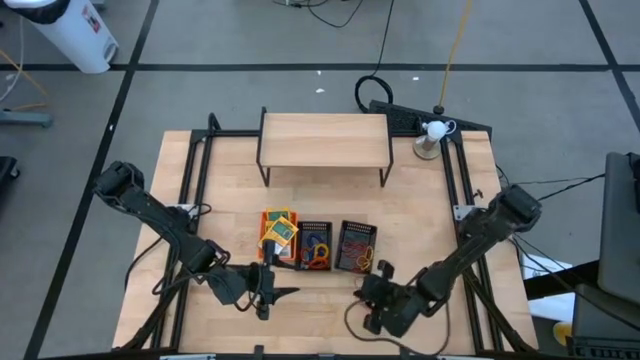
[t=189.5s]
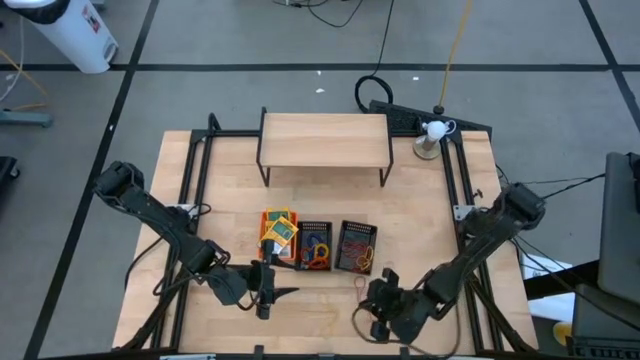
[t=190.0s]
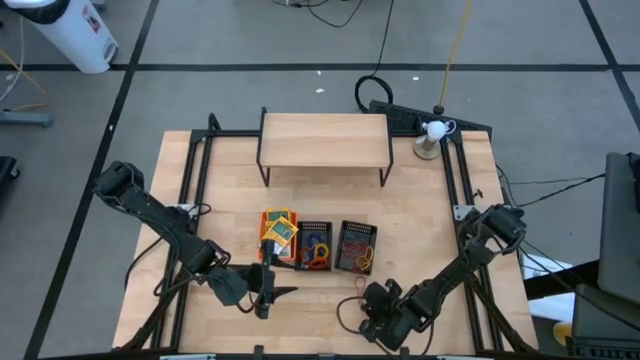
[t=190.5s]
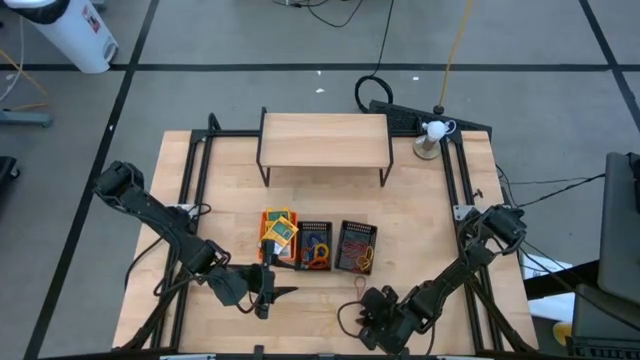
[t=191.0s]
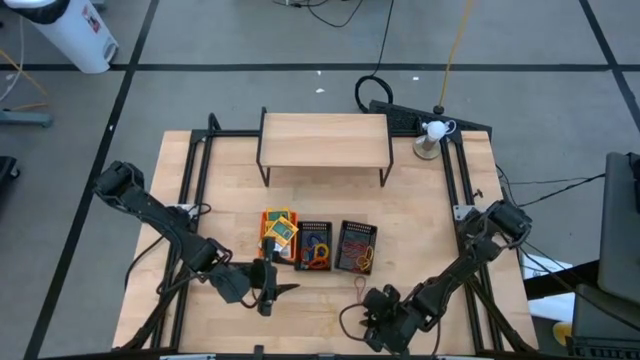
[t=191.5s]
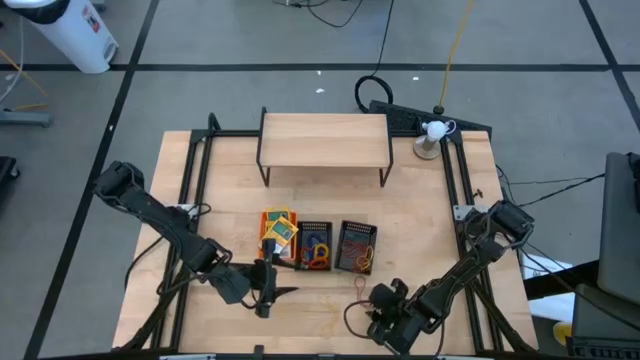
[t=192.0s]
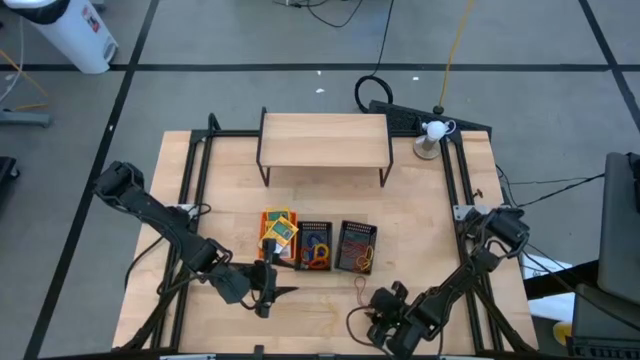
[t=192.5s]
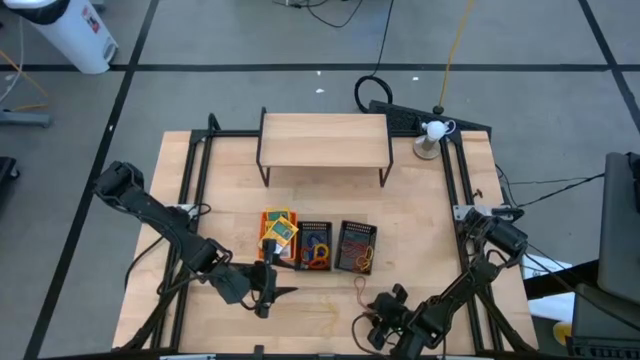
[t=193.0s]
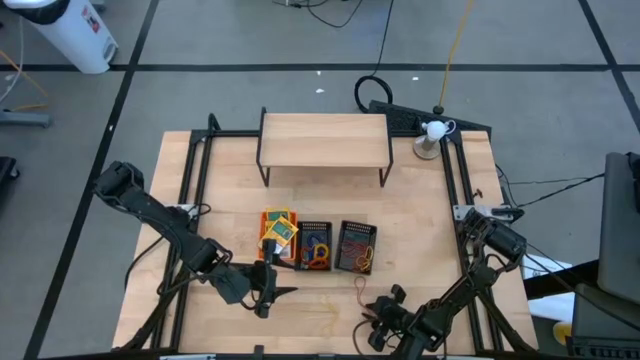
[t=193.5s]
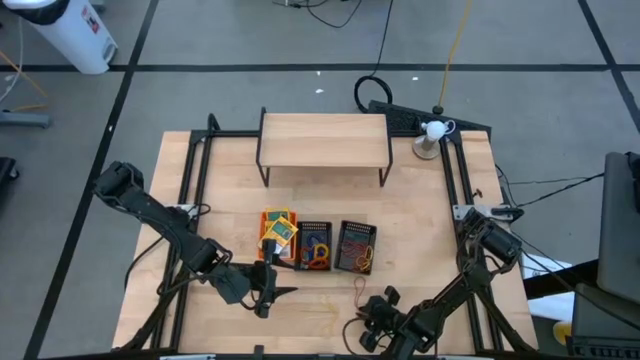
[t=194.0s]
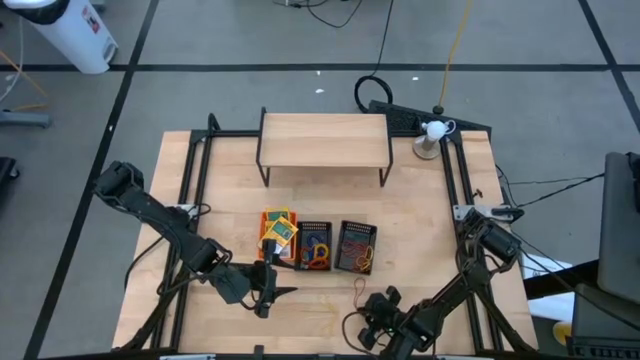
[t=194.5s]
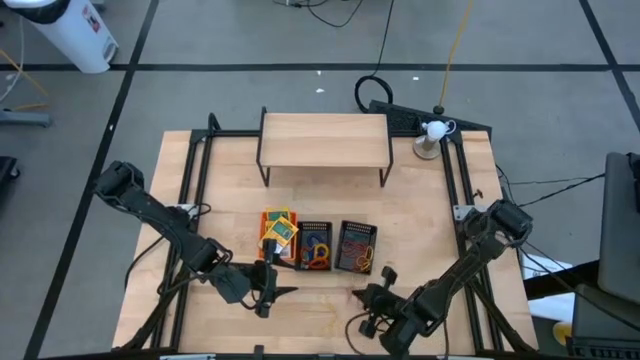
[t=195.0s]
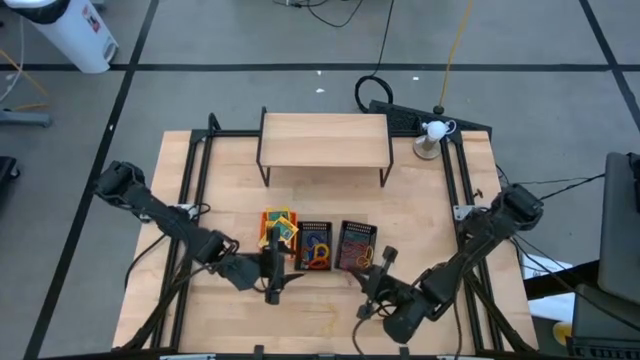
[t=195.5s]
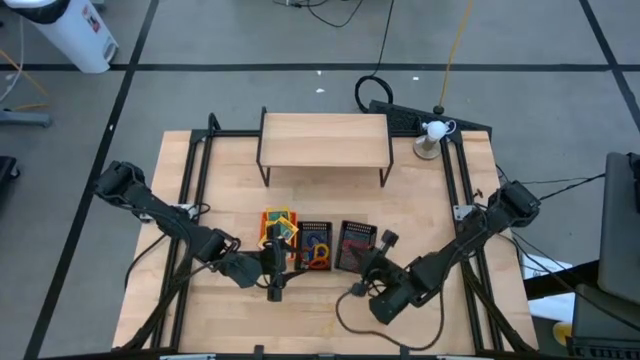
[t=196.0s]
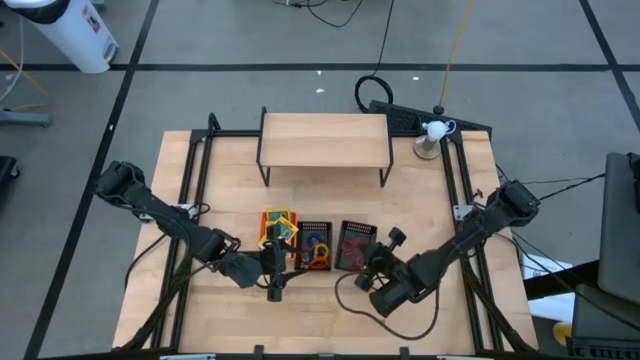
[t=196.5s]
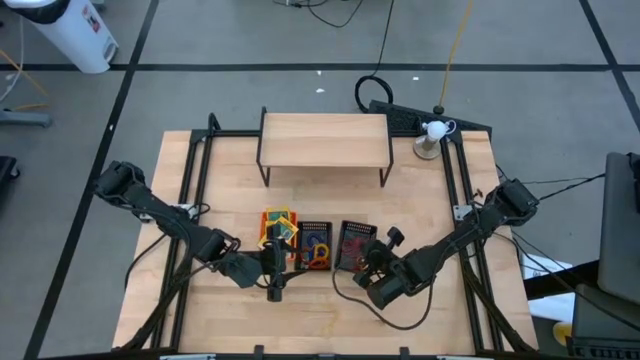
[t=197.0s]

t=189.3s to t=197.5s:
Task: Pick & Place Office Desk Supplies
Put the red rubber band into the right black bin

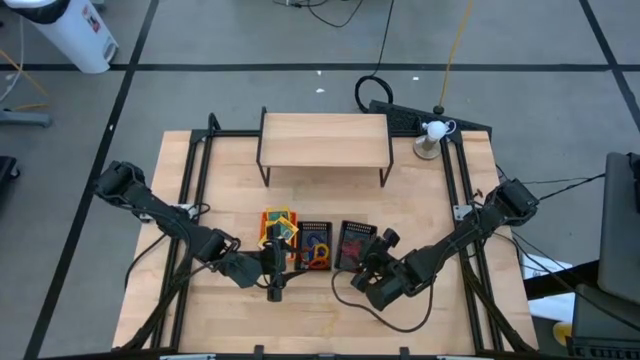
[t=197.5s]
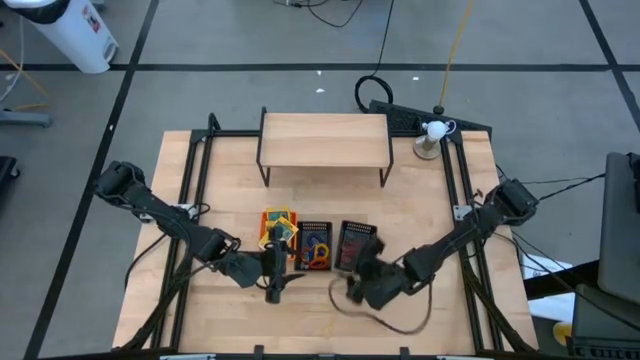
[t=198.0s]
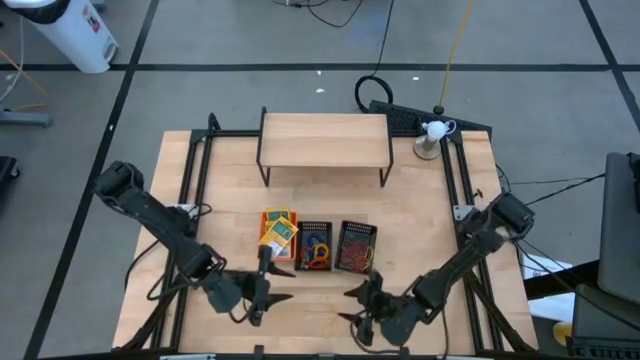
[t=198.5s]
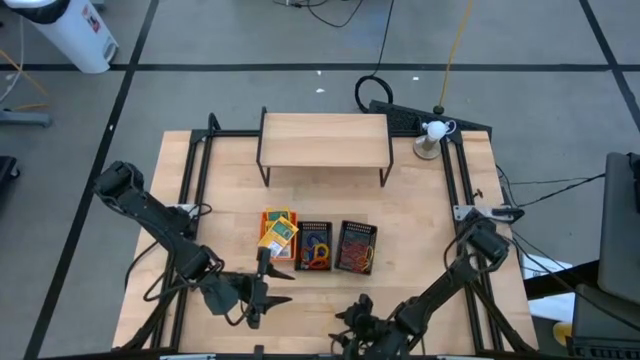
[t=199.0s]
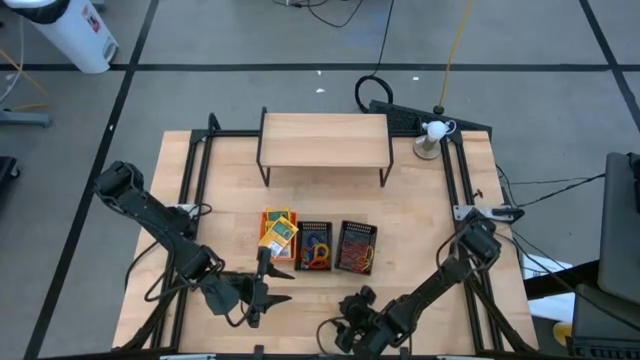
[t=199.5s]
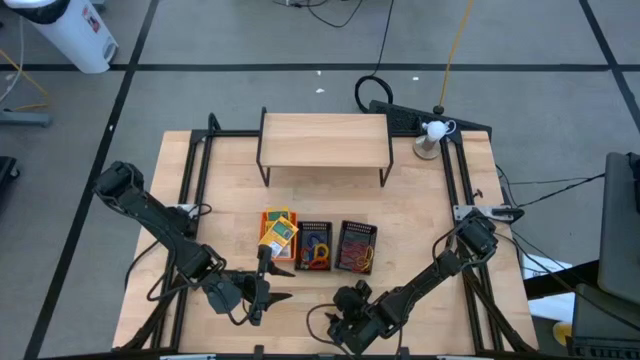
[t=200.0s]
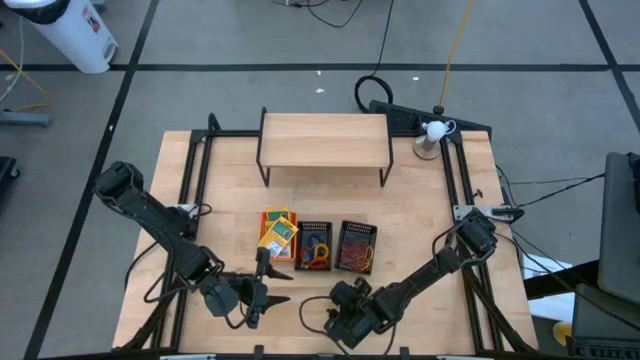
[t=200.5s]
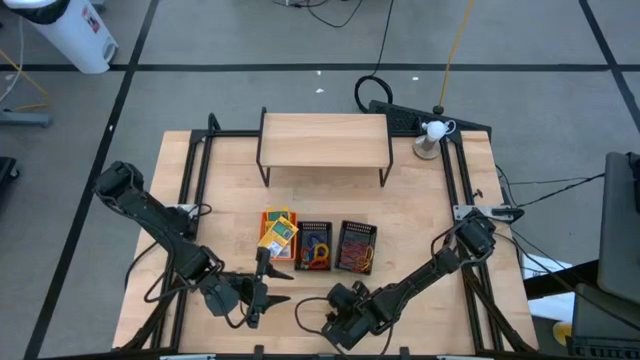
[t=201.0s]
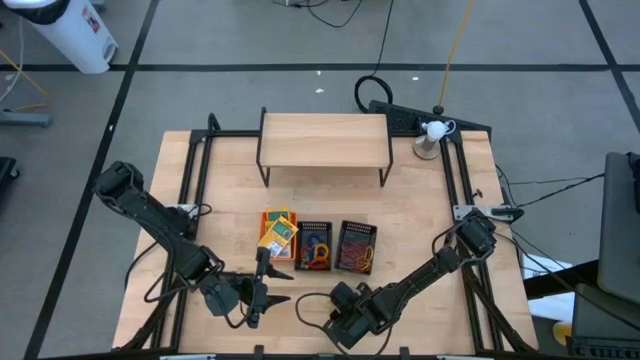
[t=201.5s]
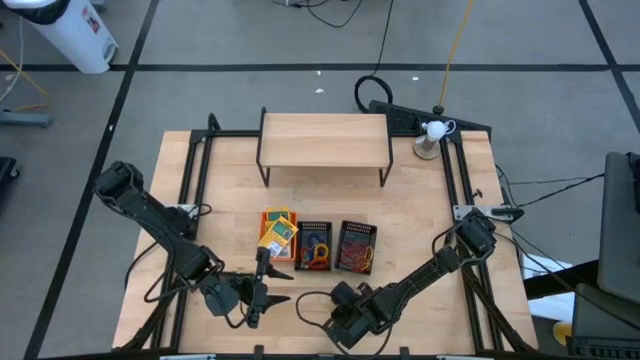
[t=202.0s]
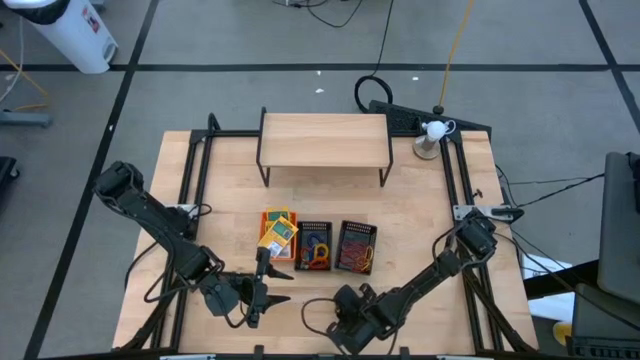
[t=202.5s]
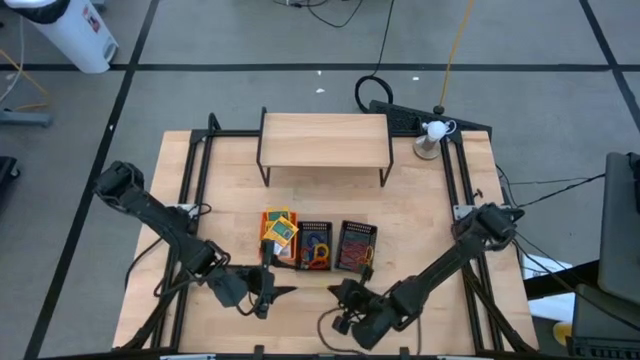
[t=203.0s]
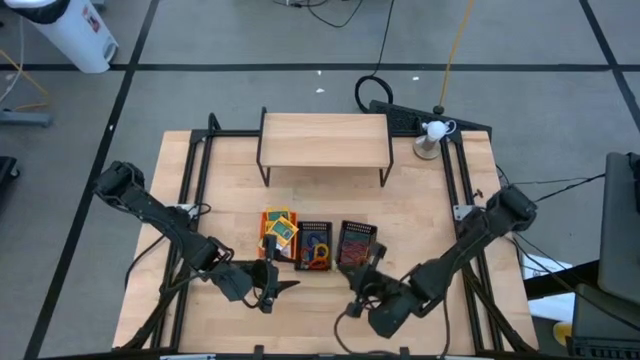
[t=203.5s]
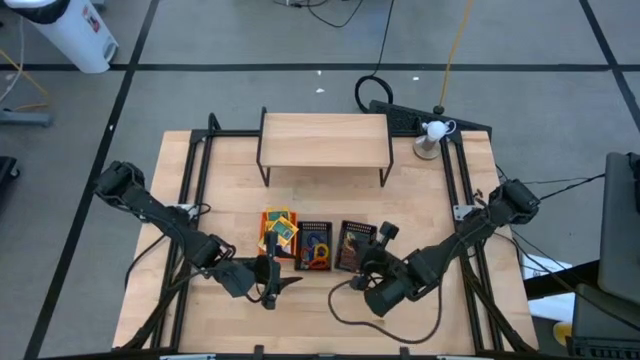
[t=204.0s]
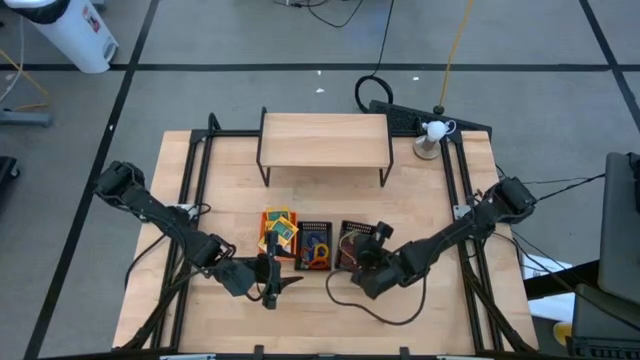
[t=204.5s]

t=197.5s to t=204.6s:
Put the yellow rubber band into the right black bin

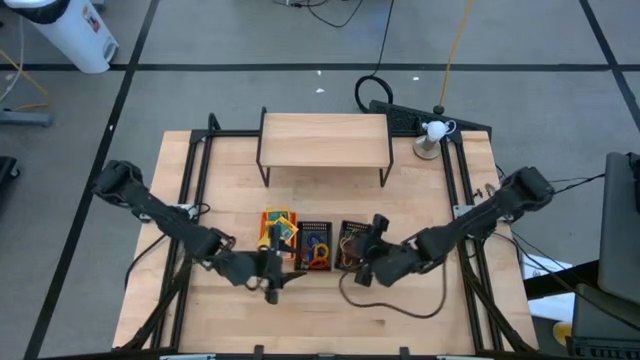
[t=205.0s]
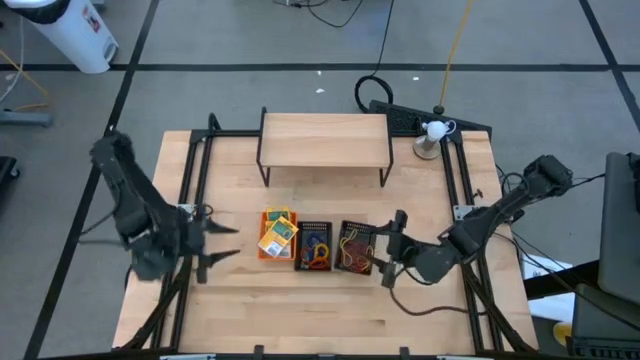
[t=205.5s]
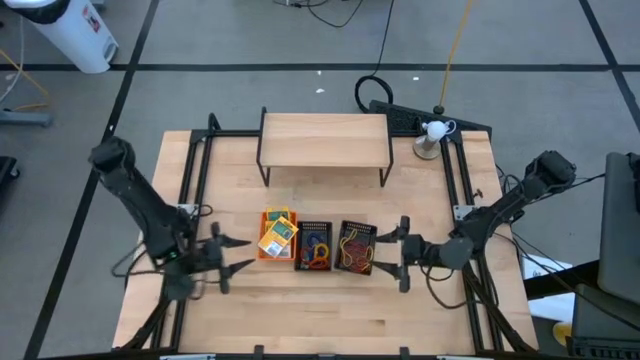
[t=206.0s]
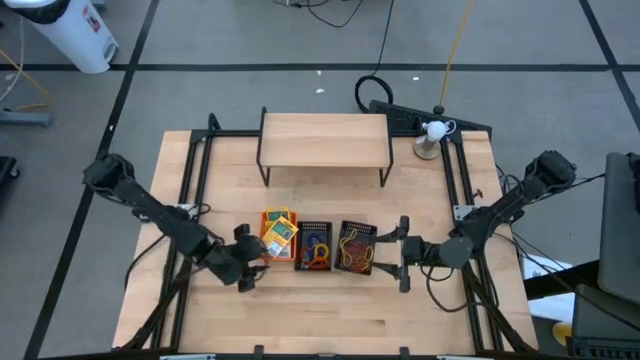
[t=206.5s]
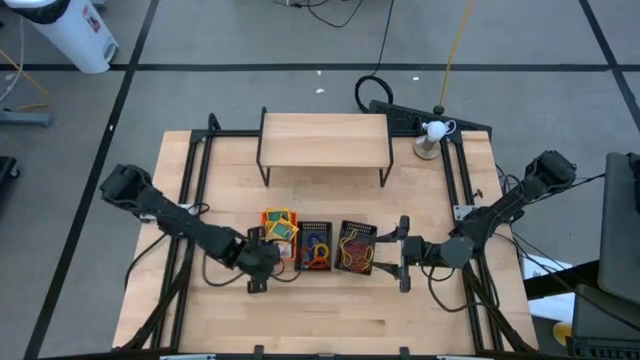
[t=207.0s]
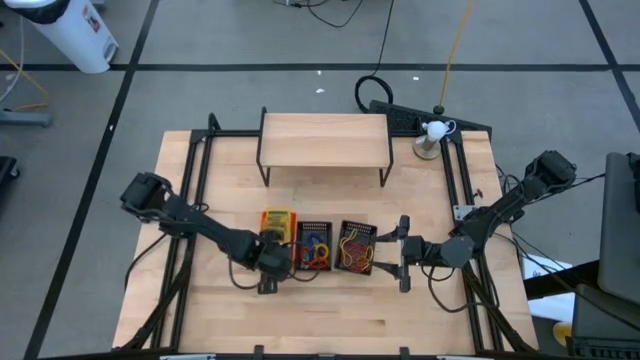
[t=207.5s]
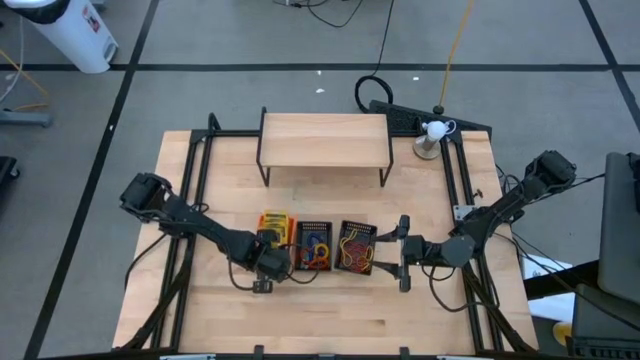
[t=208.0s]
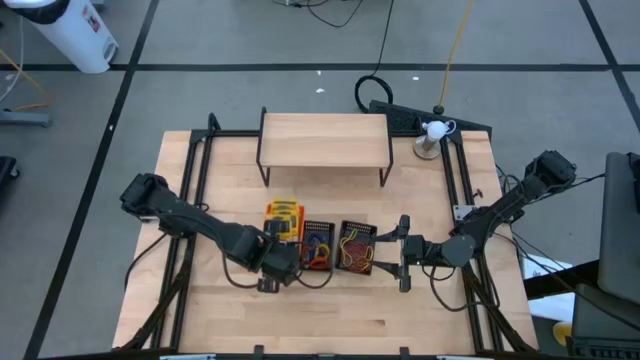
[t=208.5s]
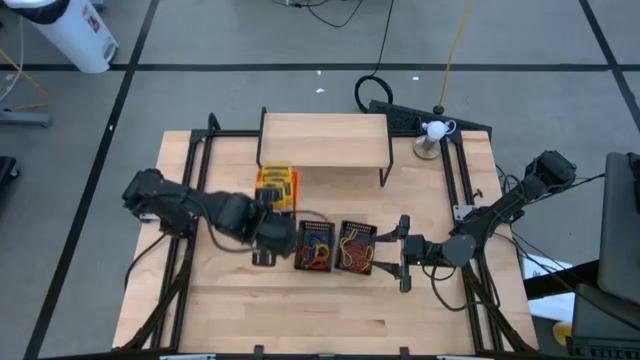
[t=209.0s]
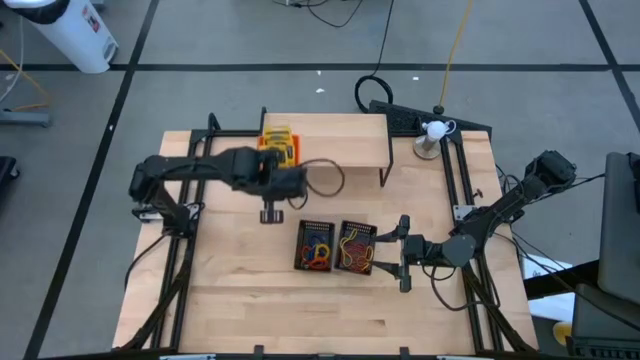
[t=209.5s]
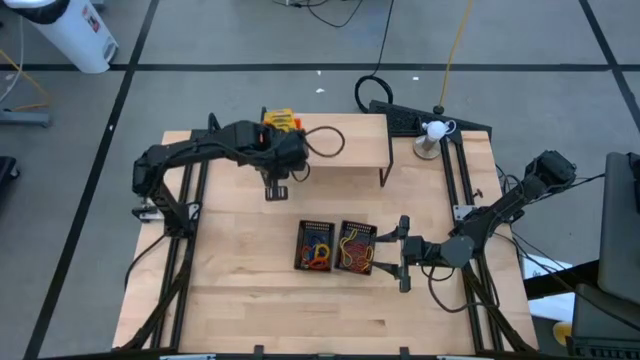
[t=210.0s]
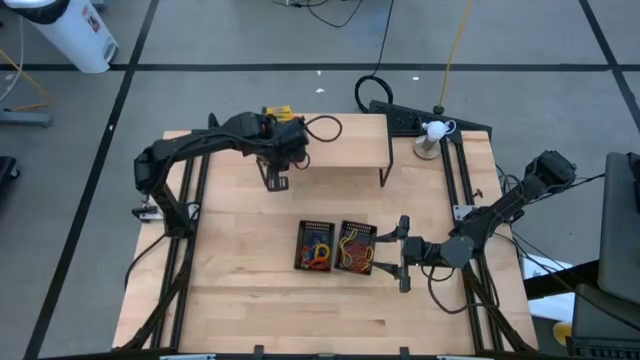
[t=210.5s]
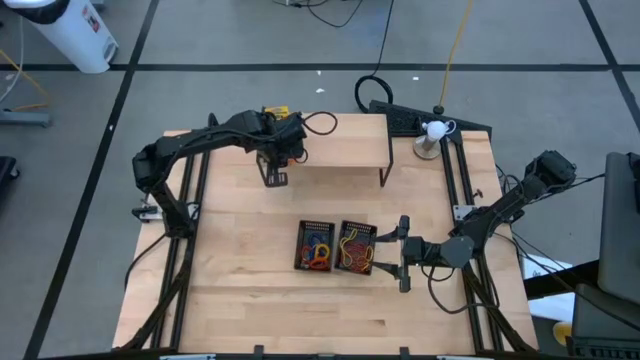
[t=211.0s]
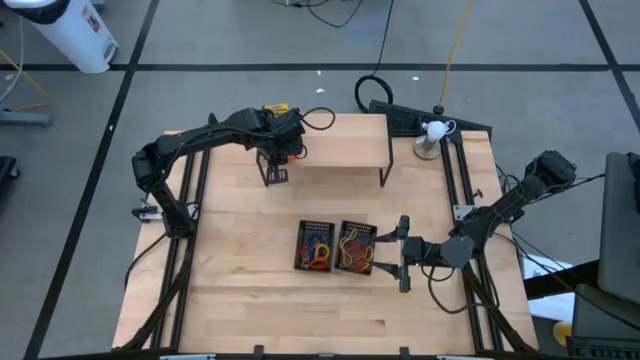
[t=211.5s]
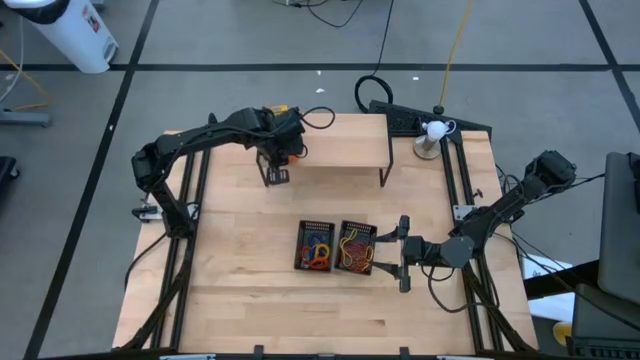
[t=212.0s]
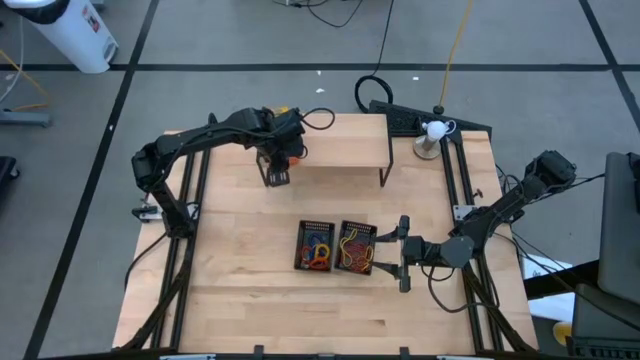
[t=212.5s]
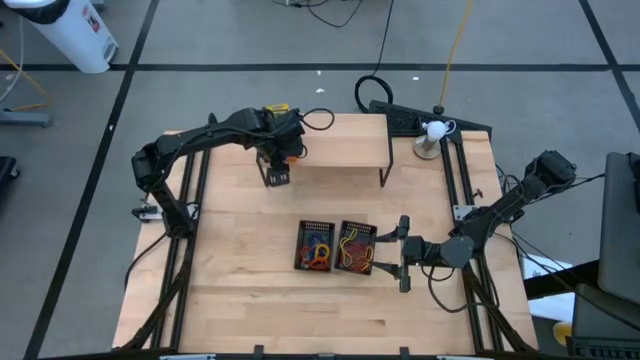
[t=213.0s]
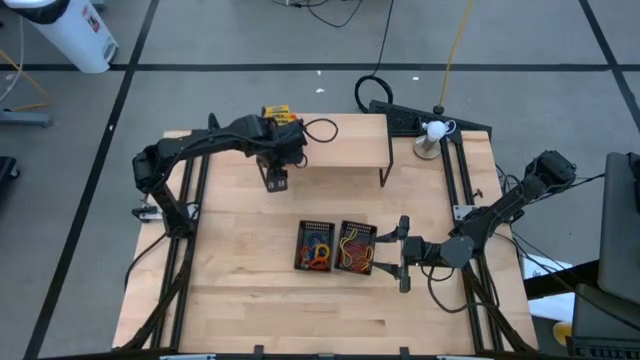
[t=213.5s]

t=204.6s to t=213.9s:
Put the orange bin on the shelf
